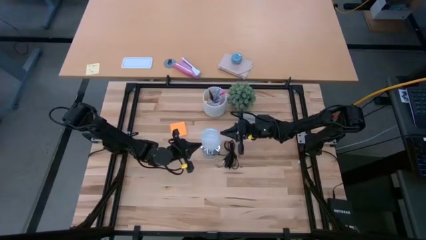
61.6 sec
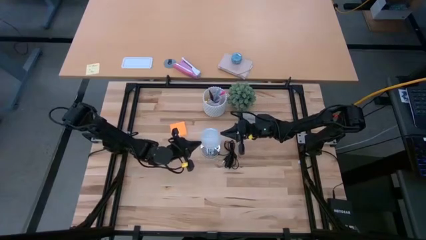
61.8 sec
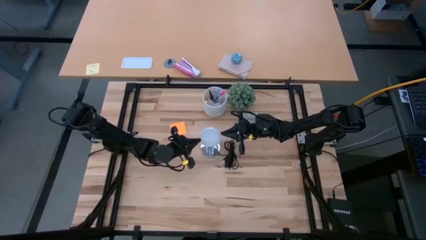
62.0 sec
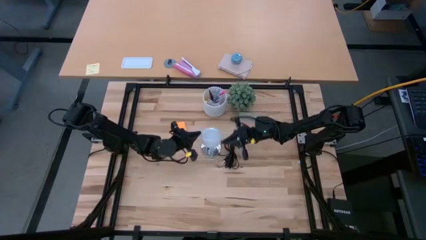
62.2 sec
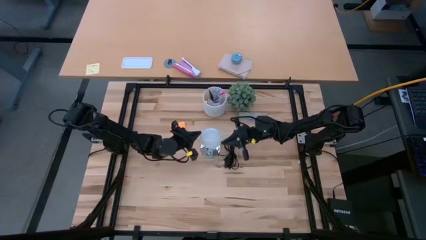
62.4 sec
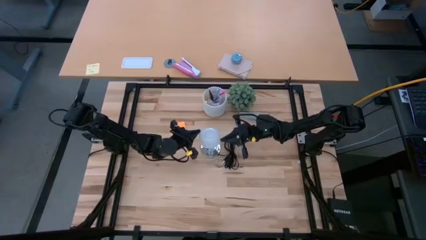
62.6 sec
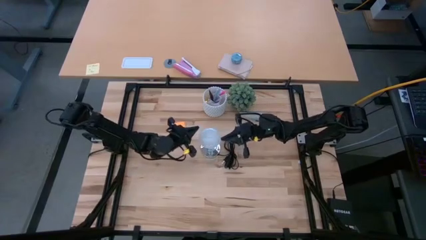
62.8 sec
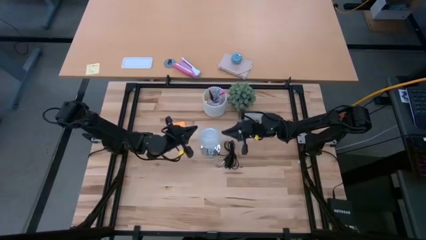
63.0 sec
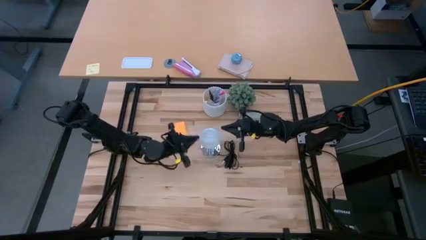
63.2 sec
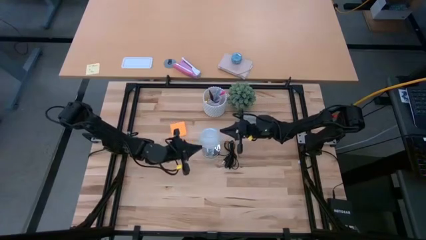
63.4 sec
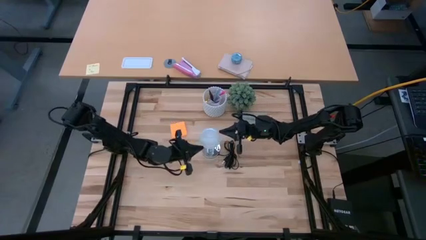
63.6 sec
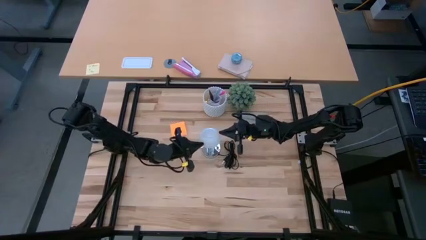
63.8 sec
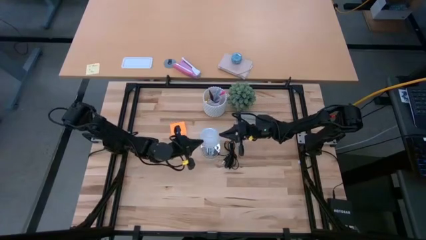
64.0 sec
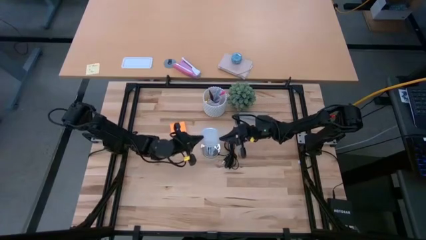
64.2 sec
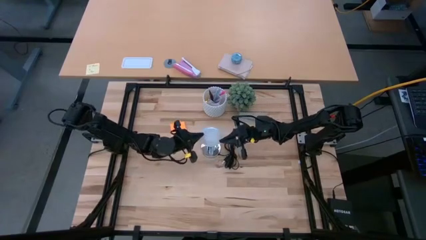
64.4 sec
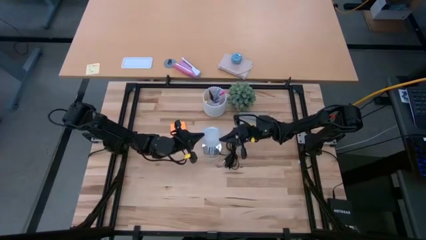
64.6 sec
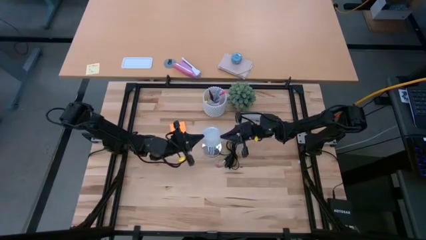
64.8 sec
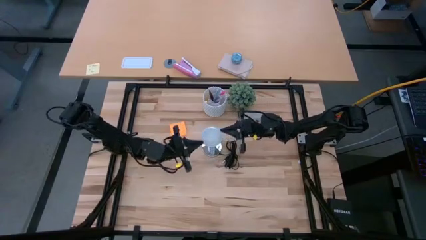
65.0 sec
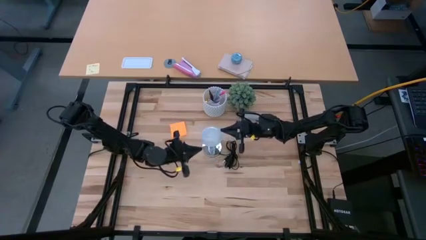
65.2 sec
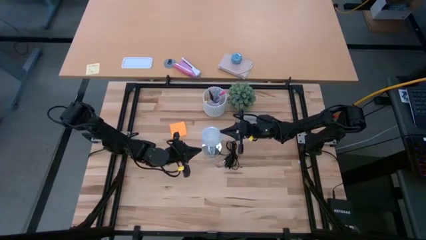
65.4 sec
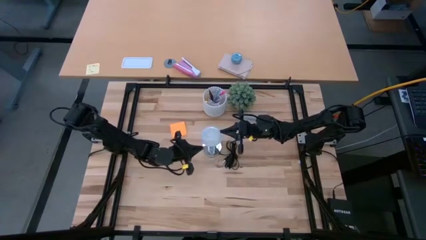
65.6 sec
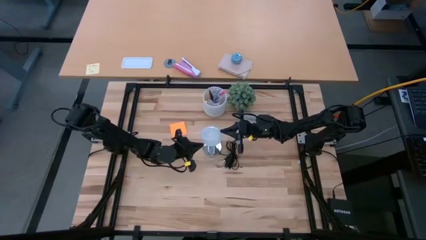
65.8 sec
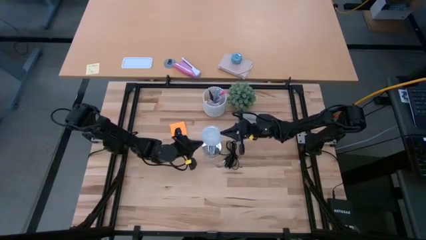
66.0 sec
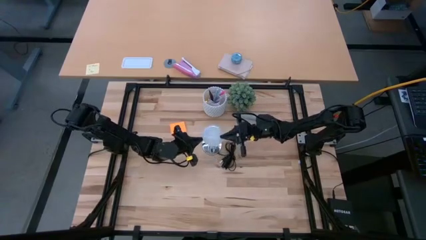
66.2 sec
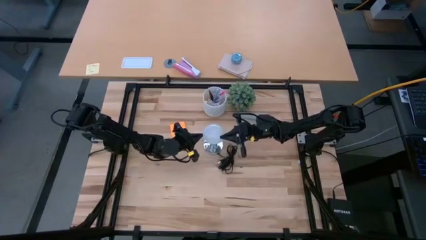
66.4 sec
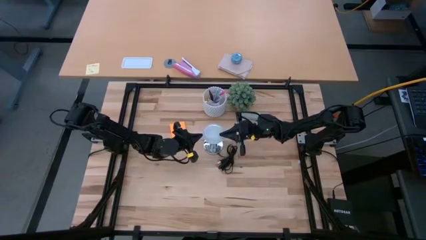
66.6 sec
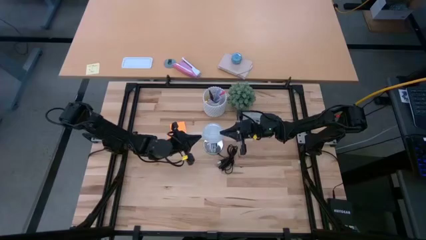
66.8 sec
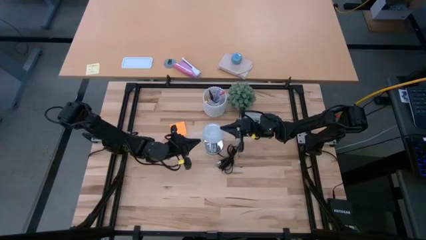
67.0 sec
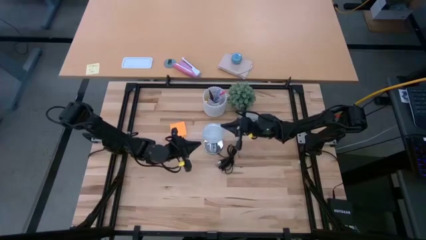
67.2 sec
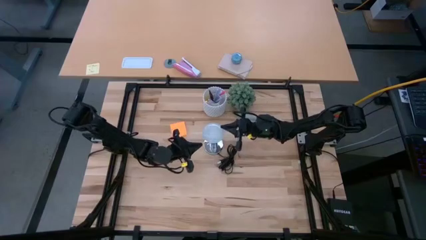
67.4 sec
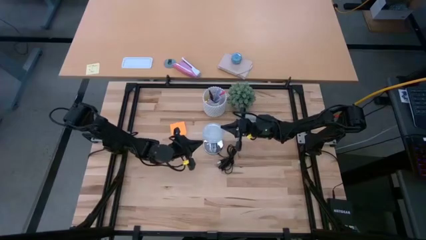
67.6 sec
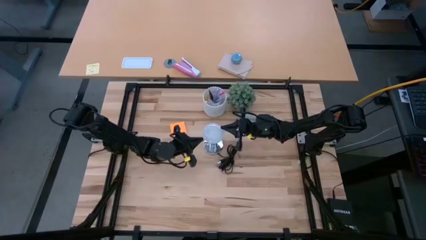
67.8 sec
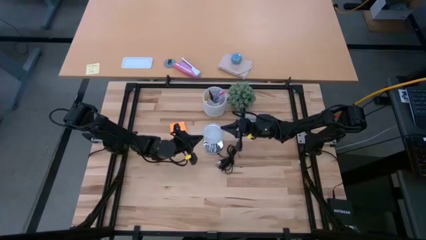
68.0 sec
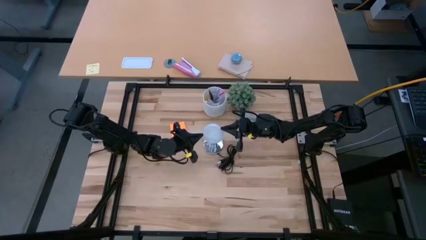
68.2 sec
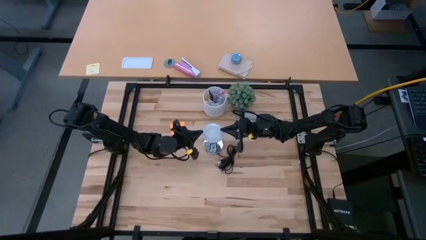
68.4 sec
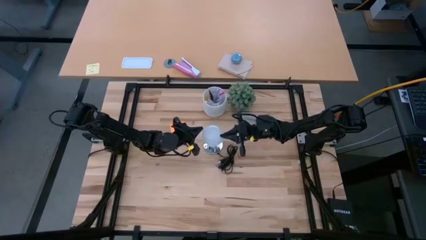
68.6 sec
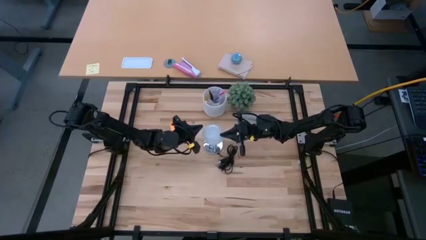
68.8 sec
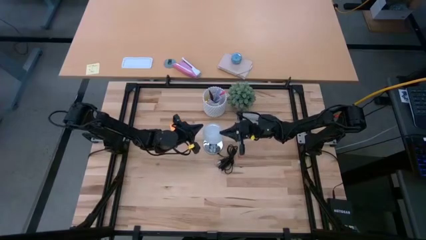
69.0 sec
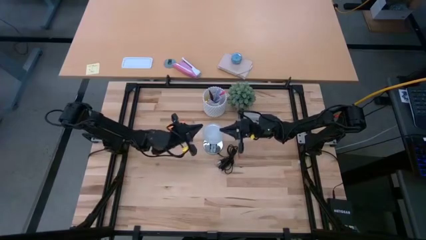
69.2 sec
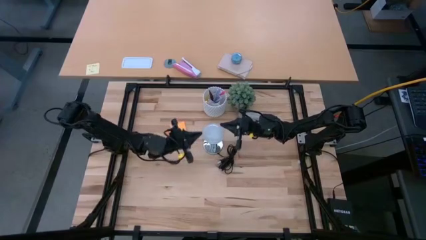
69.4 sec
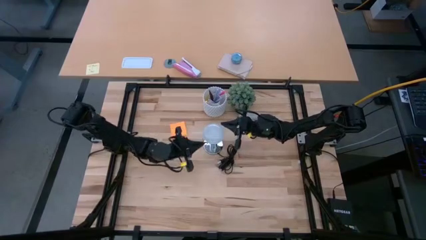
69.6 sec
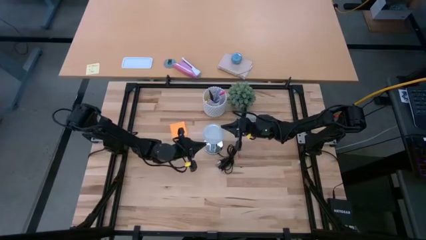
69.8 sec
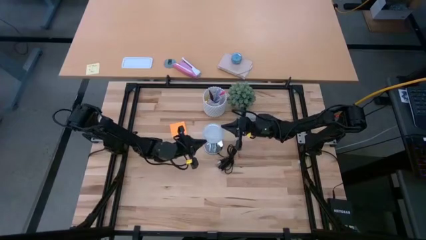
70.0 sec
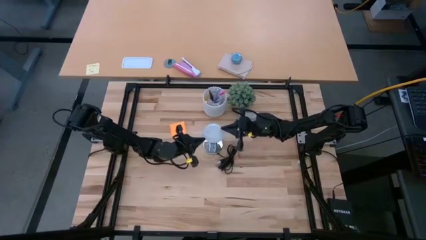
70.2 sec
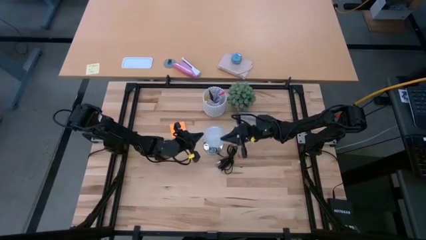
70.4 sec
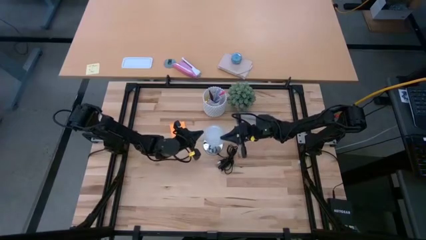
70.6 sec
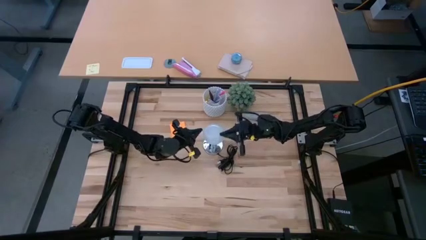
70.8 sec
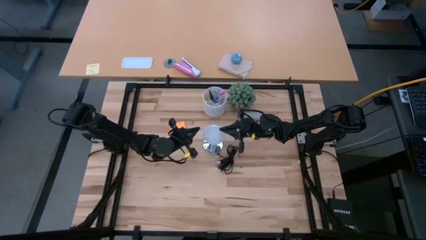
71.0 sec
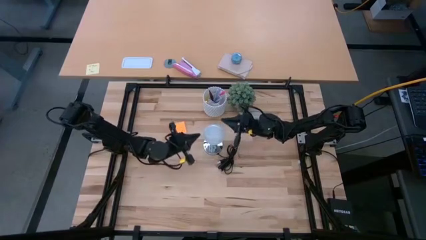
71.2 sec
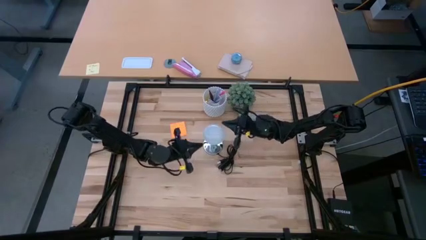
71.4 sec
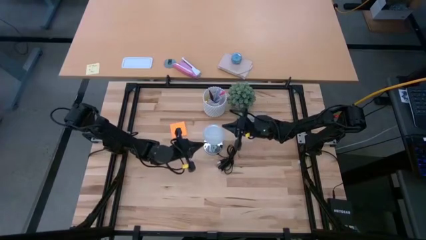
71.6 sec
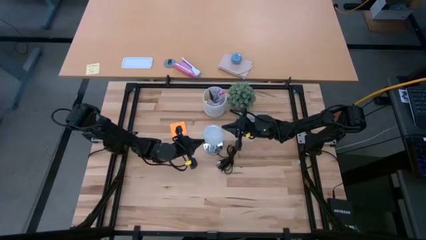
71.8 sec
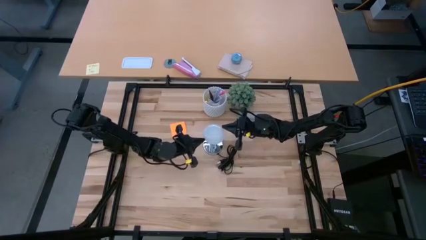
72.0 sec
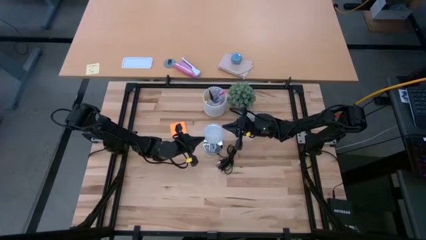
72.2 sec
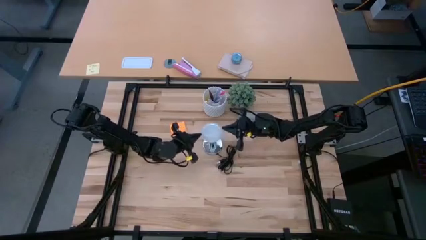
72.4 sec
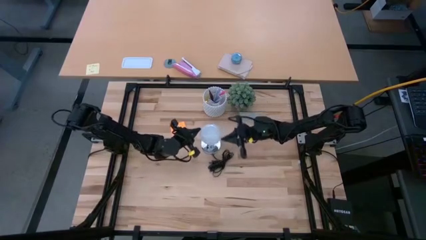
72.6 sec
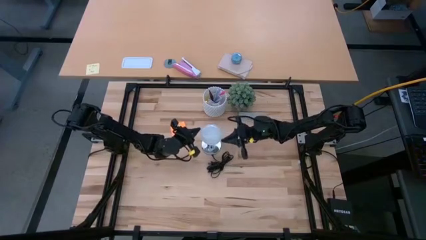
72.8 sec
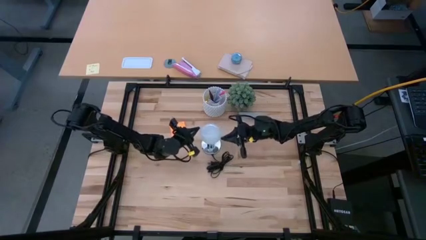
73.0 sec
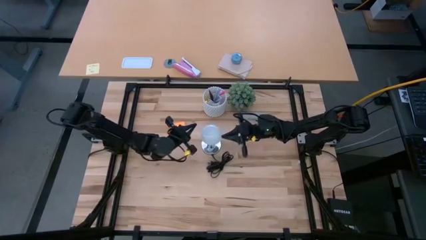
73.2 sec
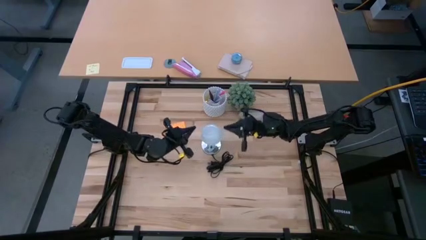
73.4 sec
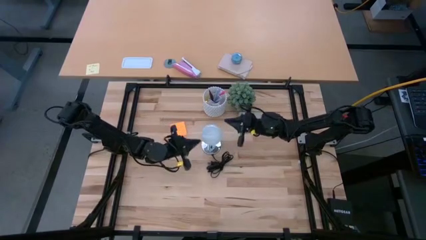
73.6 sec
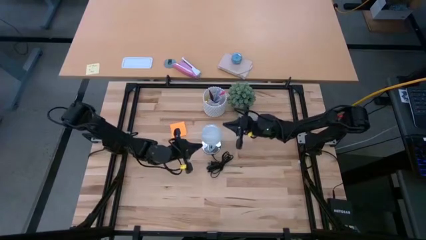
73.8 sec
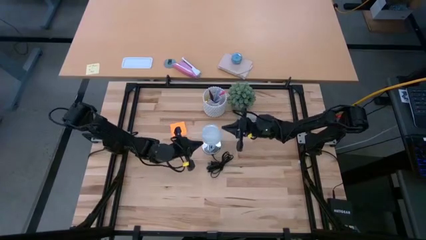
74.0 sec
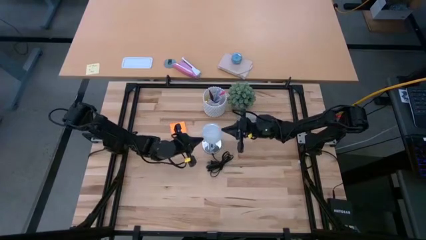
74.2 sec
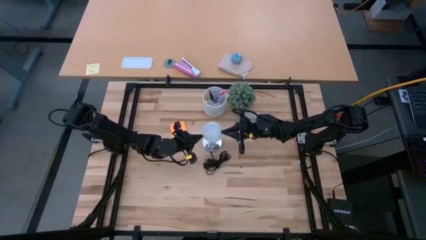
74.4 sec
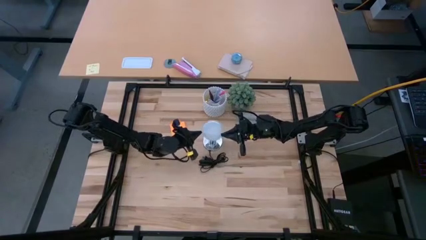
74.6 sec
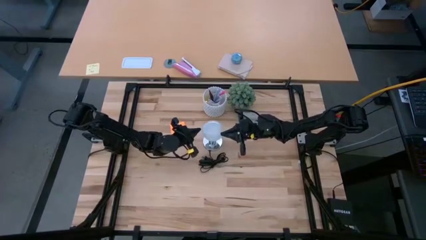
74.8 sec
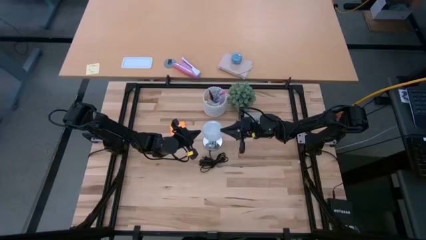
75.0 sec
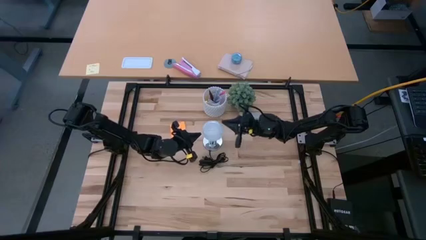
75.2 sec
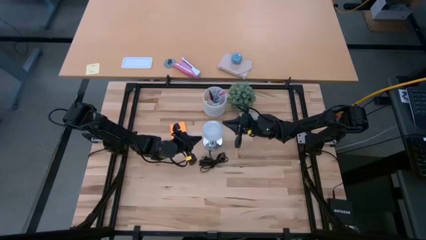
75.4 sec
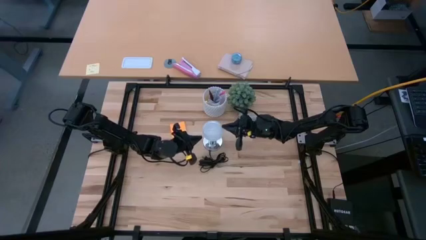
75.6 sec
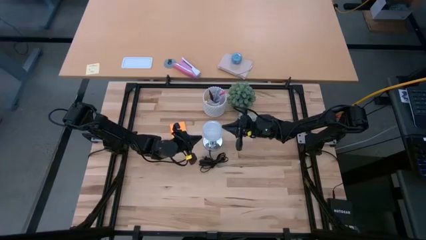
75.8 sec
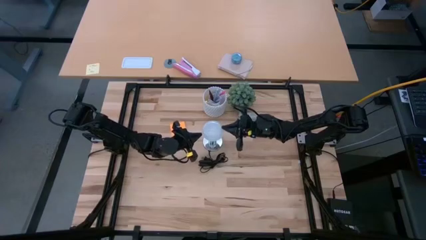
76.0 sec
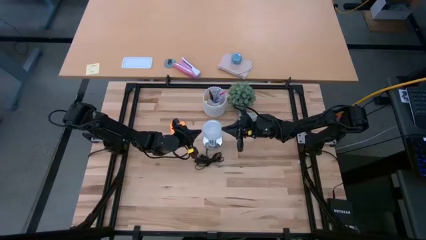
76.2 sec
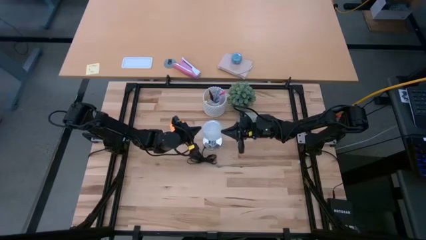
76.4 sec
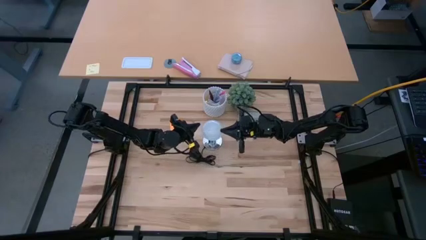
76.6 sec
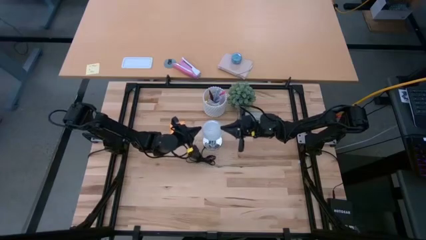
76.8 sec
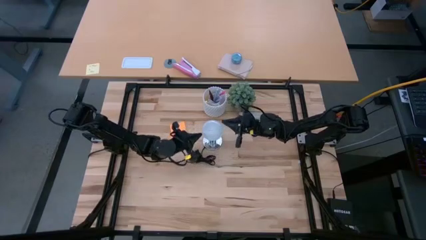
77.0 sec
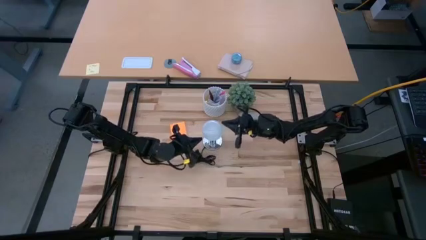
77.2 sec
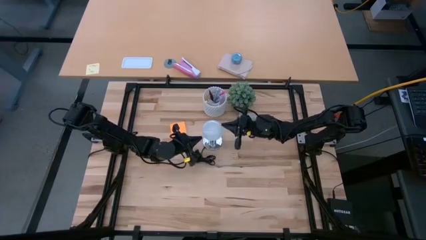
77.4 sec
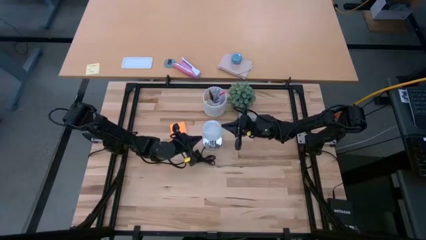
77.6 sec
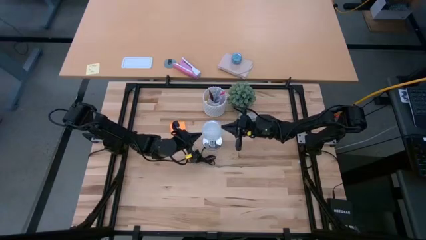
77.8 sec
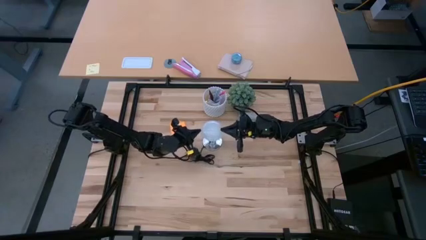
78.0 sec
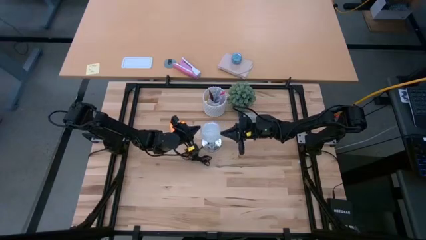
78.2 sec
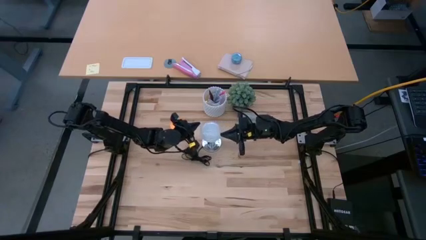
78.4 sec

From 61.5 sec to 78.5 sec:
Task: Screw lightbulb
Insert the light bulb into the lamp socket
